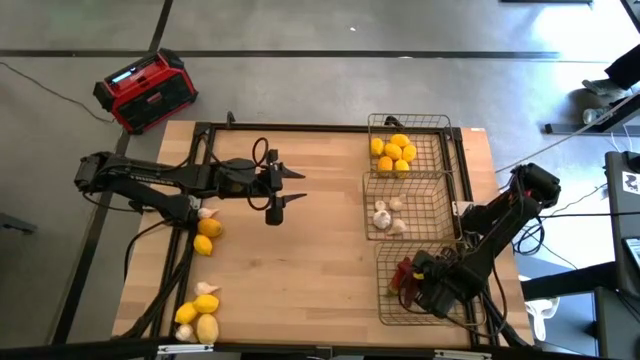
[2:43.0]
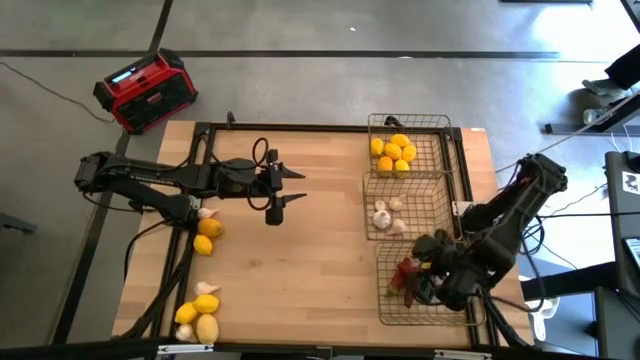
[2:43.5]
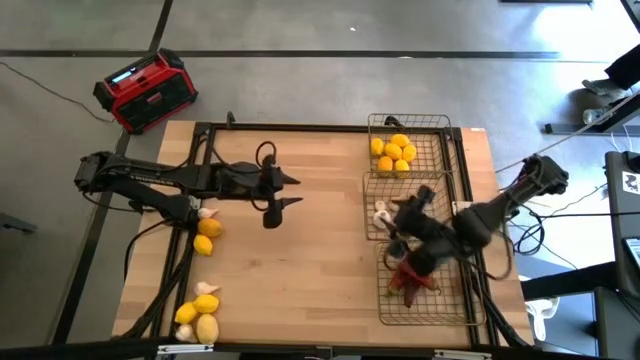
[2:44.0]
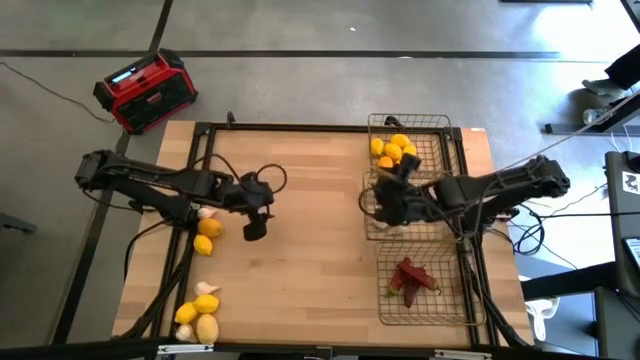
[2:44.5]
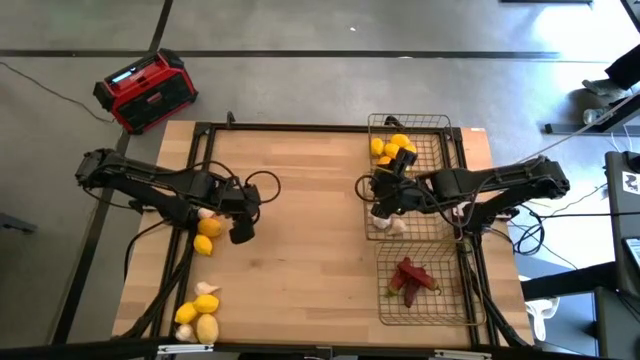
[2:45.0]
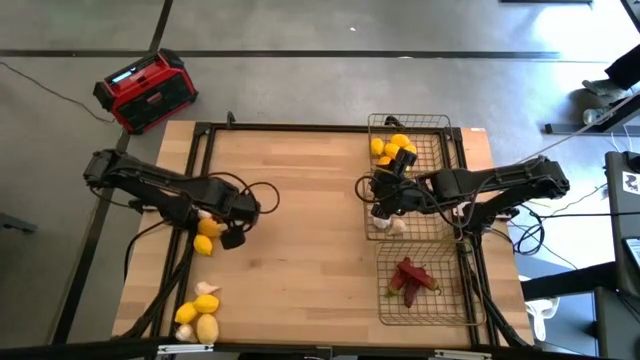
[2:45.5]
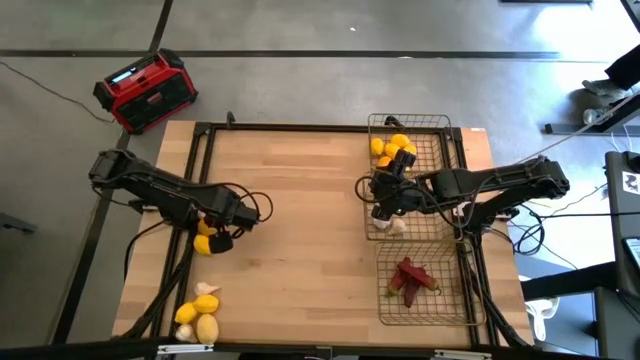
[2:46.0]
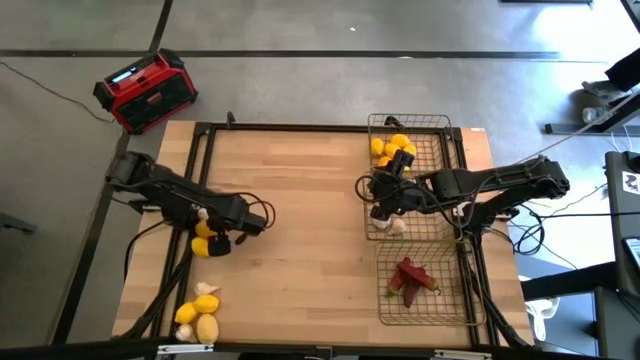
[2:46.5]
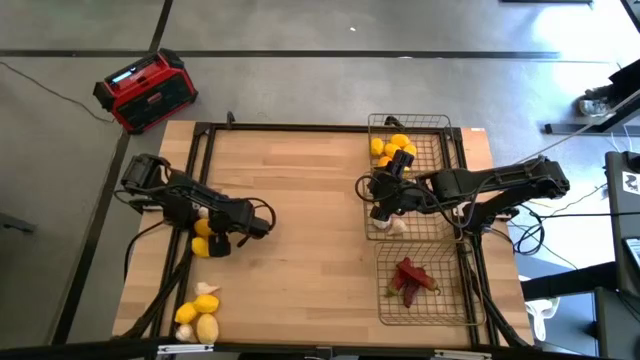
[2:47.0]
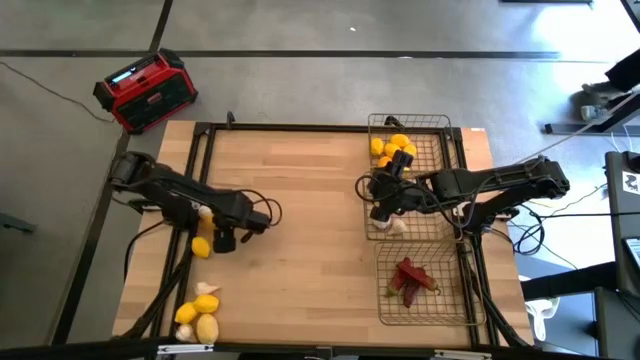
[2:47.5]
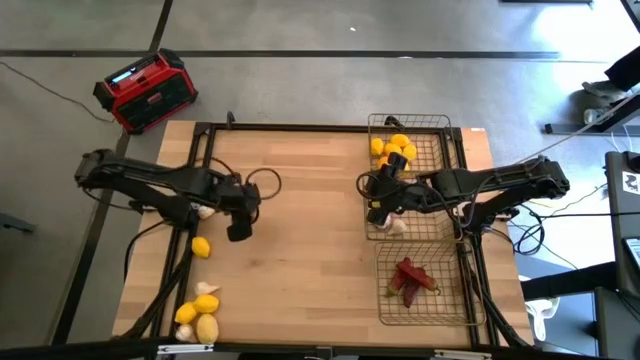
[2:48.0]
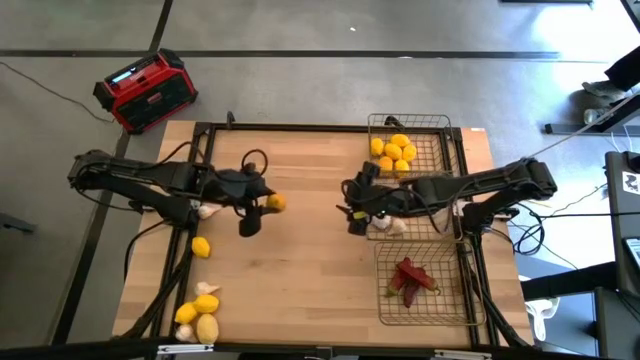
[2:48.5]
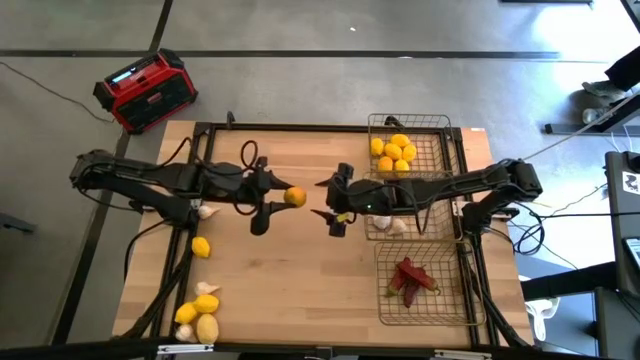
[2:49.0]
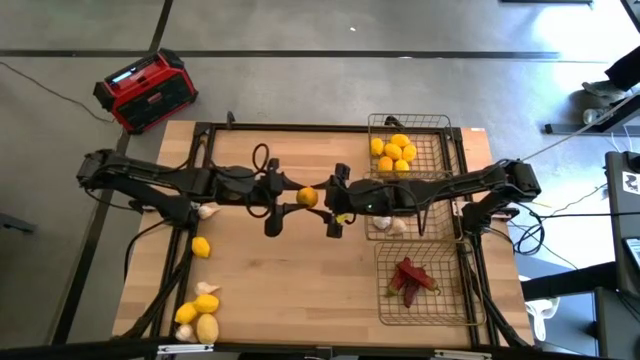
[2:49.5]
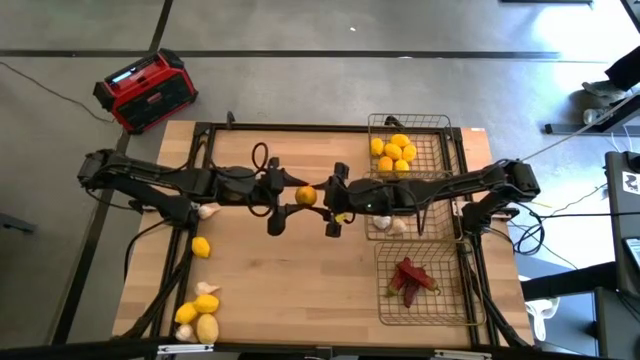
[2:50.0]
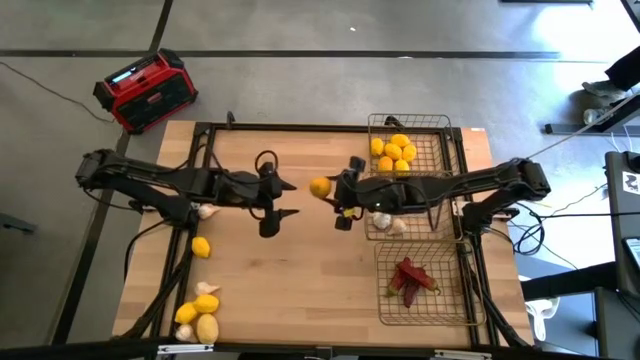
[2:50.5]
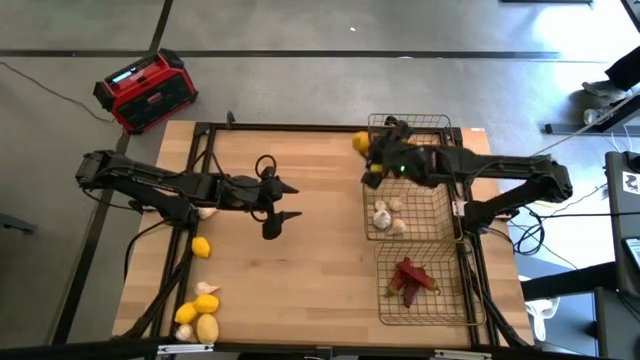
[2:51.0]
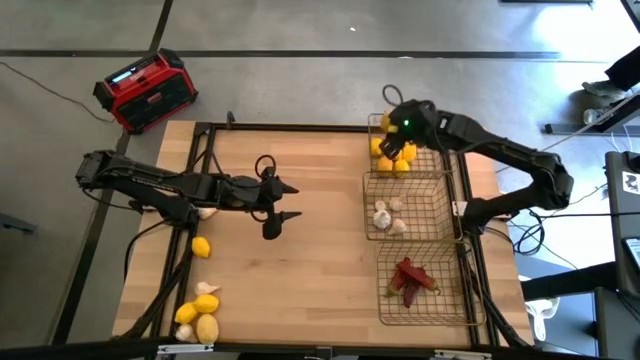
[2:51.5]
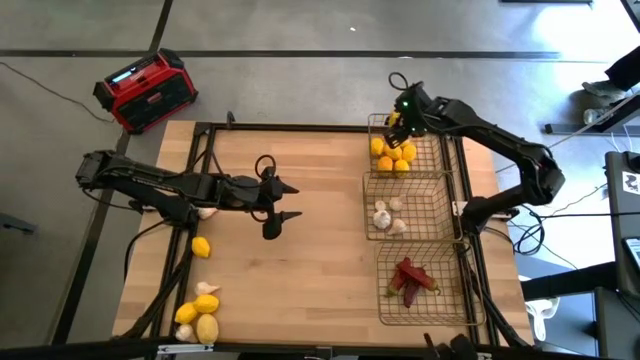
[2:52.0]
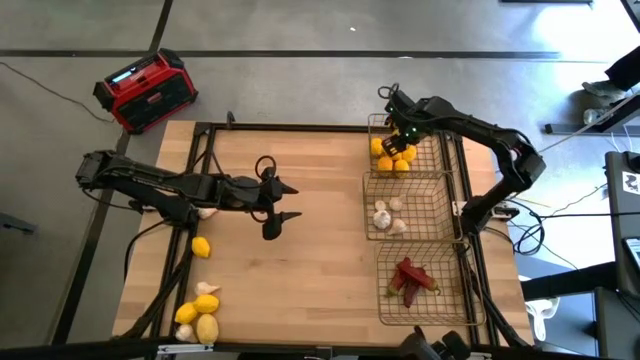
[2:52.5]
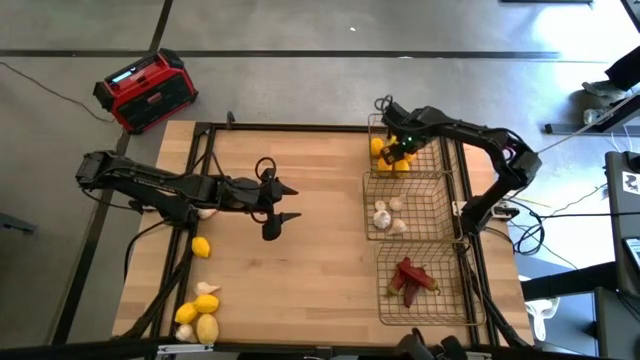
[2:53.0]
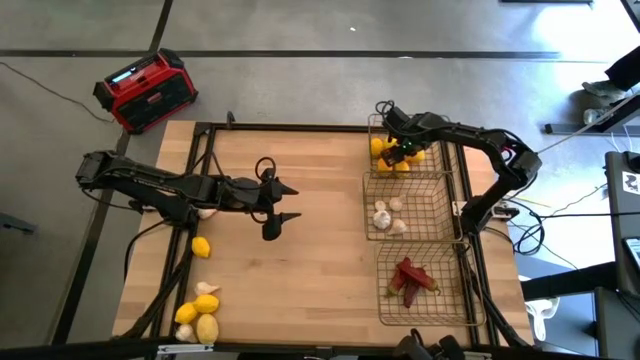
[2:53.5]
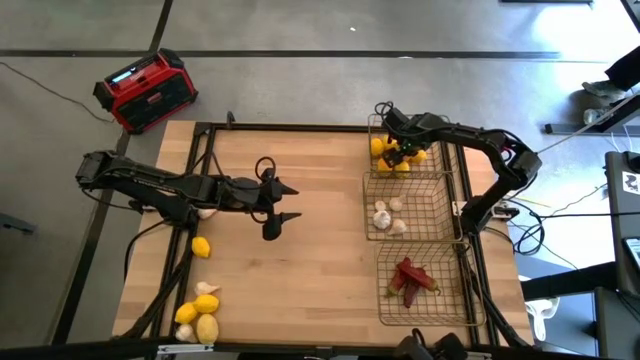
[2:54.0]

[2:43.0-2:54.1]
Task: Sort produce into baskets
Put the yellow lemon into the top wire basket

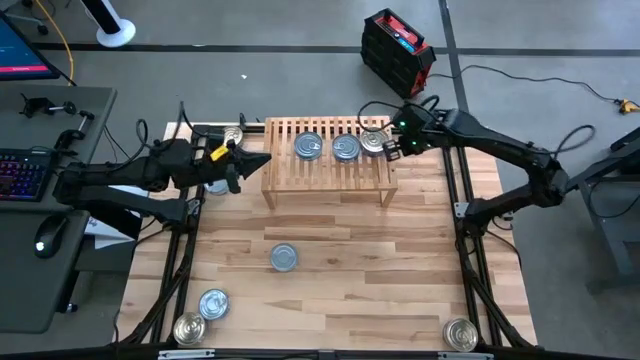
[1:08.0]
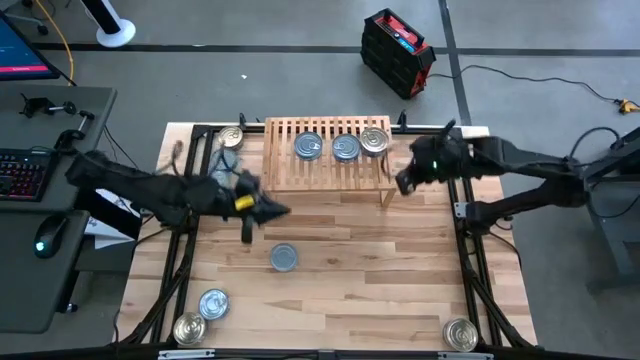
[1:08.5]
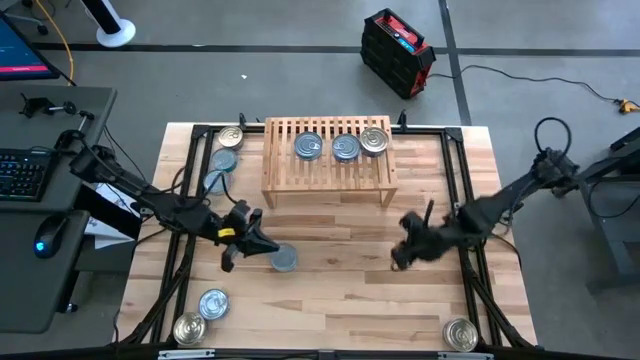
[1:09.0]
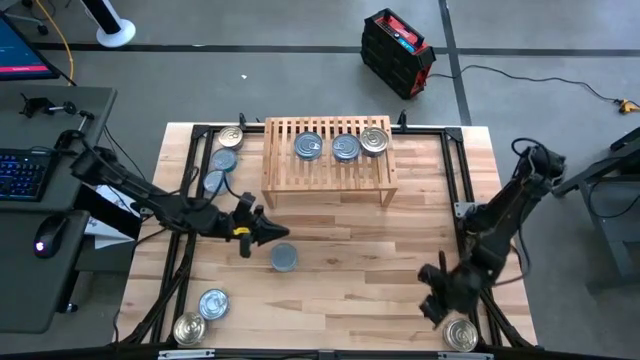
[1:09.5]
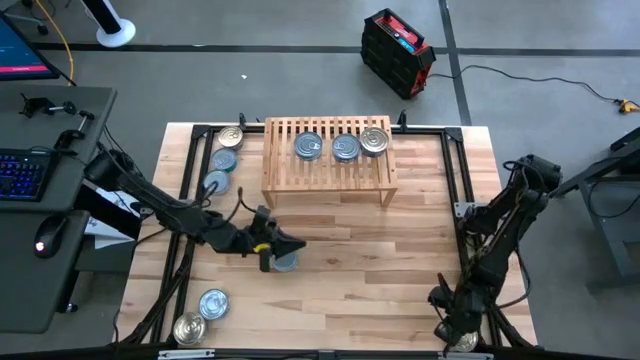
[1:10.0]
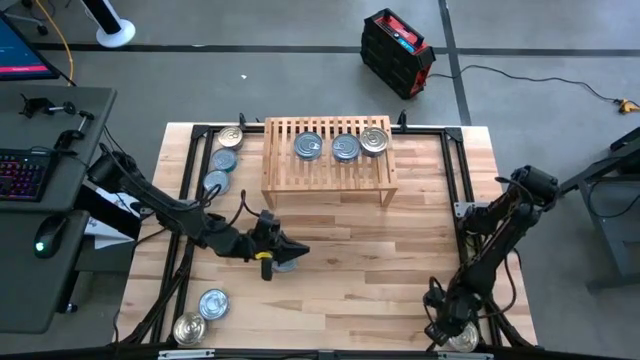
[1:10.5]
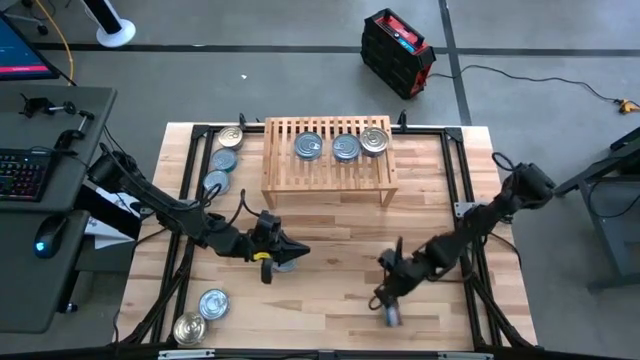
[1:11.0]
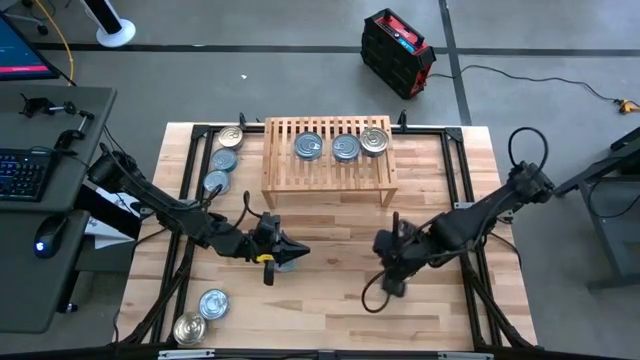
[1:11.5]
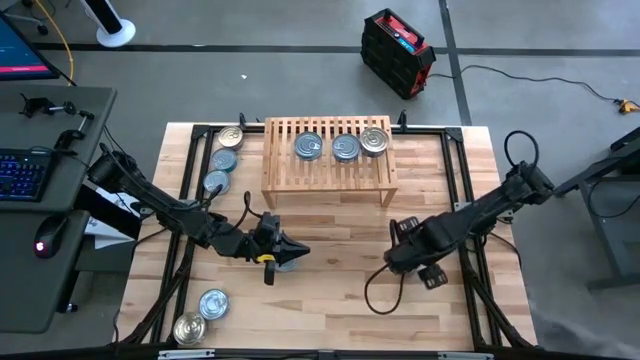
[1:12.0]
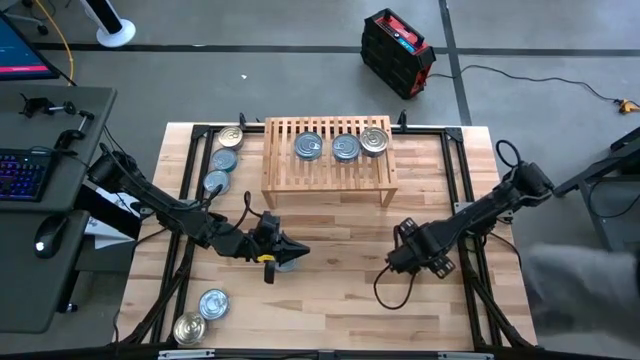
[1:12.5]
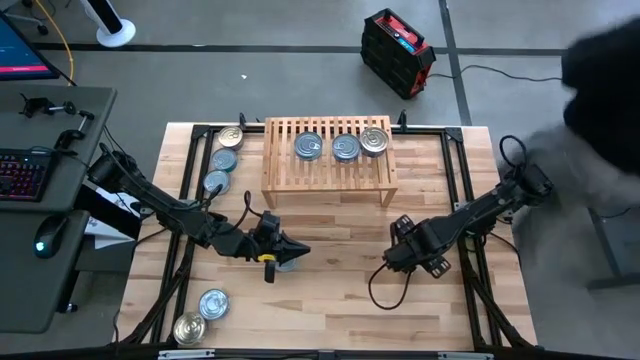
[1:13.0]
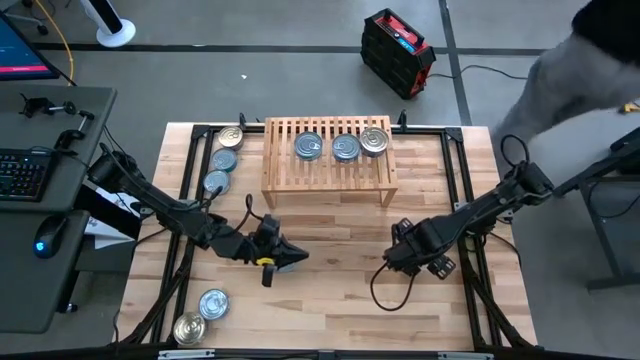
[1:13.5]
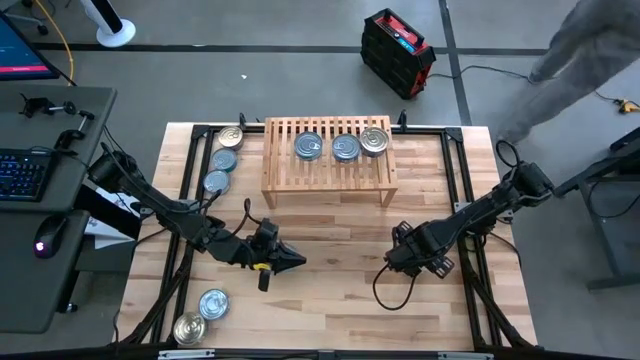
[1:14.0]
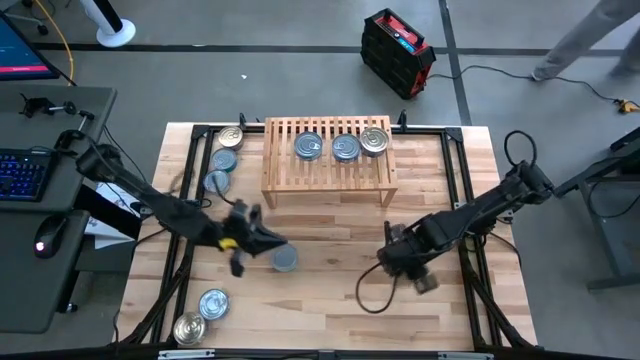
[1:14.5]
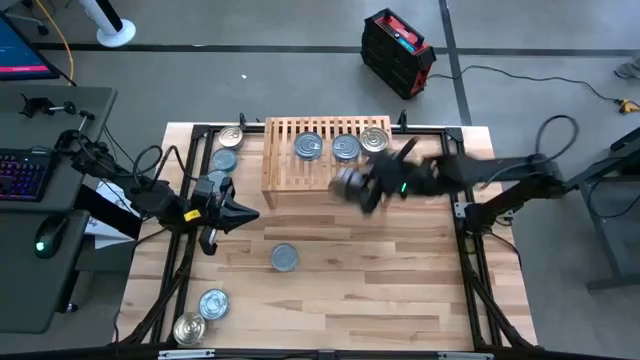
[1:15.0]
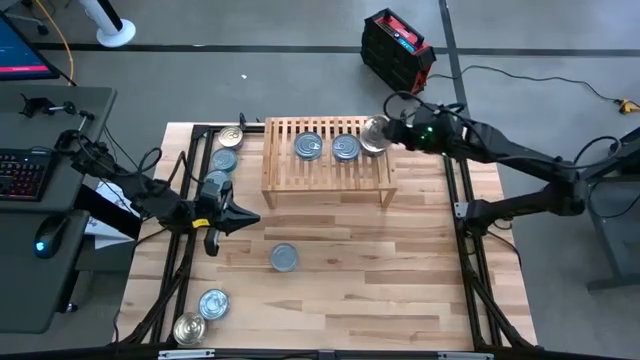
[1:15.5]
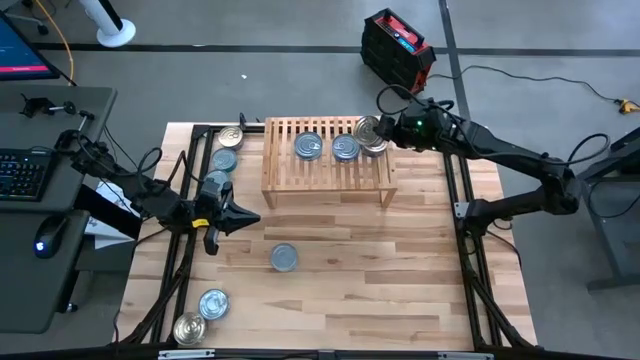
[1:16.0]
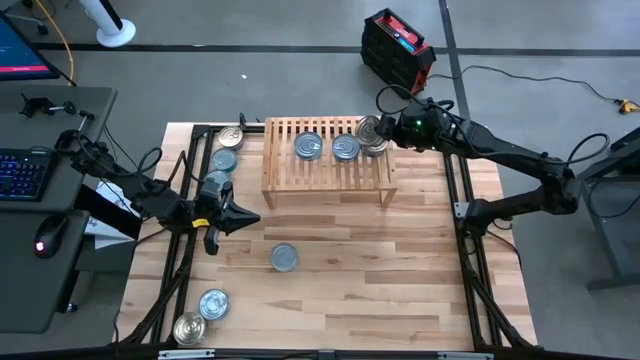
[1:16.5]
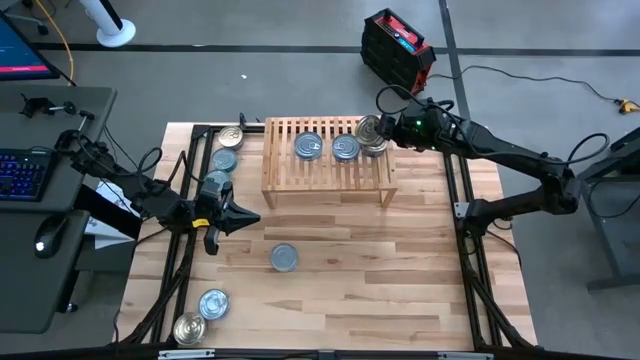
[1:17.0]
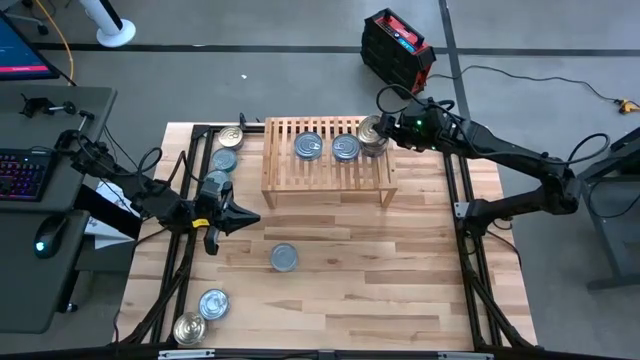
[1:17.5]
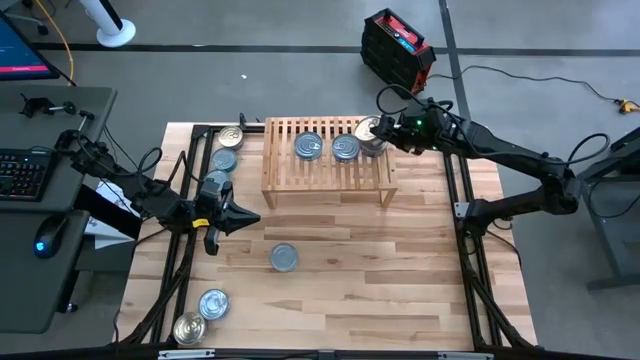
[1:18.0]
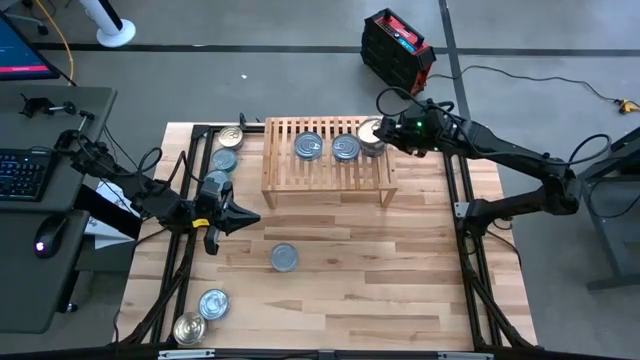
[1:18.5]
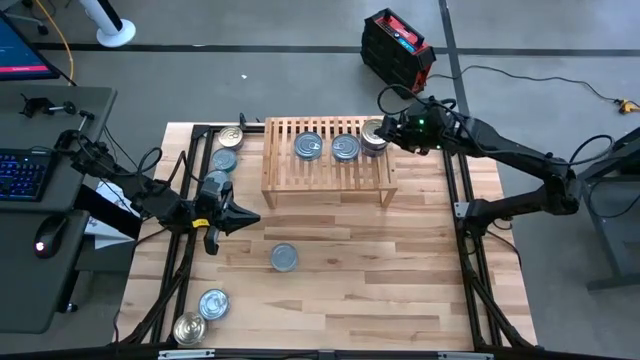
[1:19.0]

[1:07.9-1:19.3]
Task: Stack canned seafood by type on shelf
Stack the pink tuna can on the other pink tuna can on the shelf
